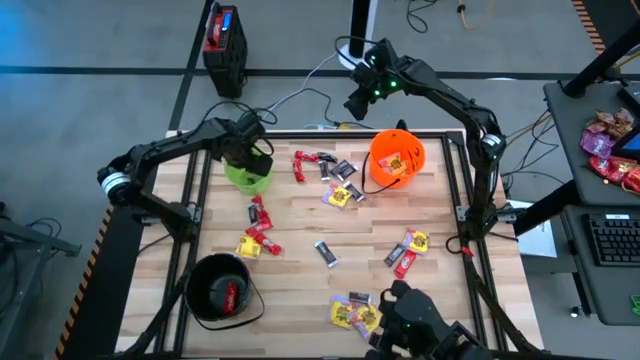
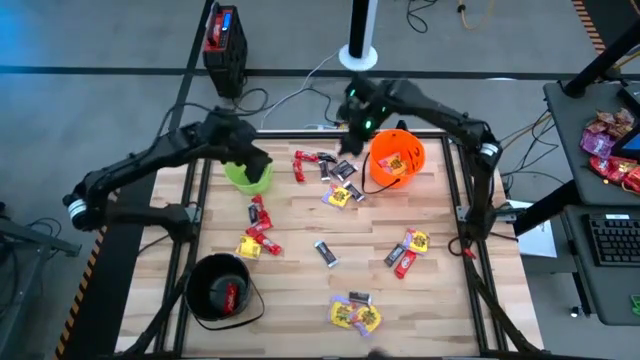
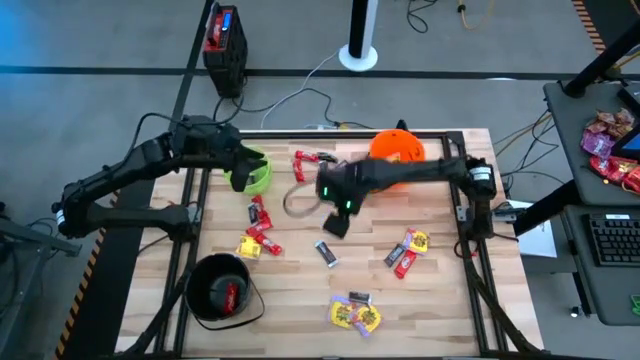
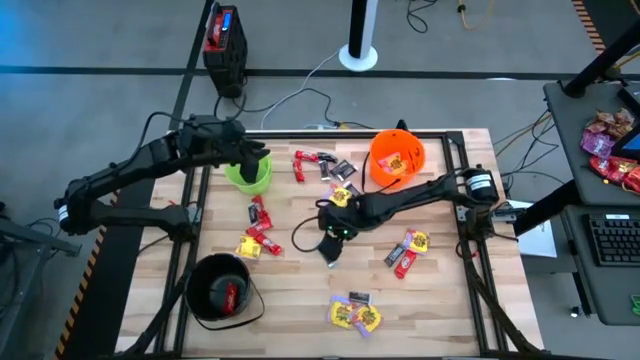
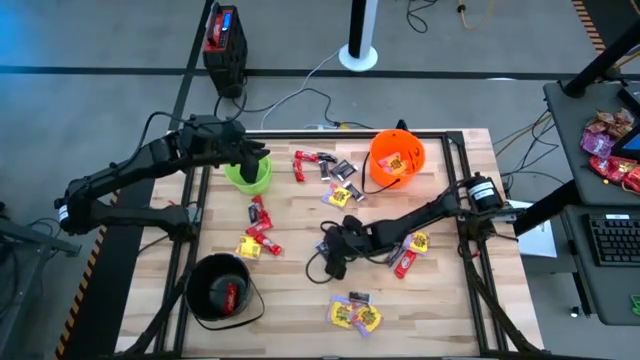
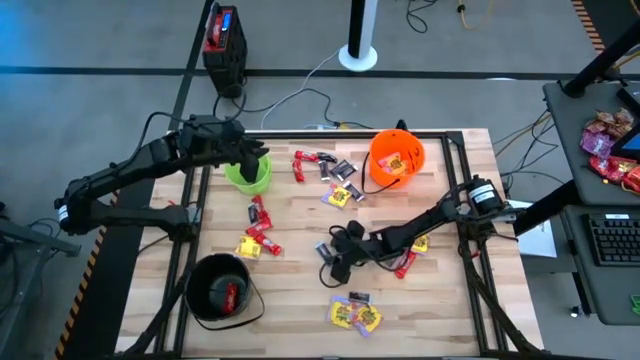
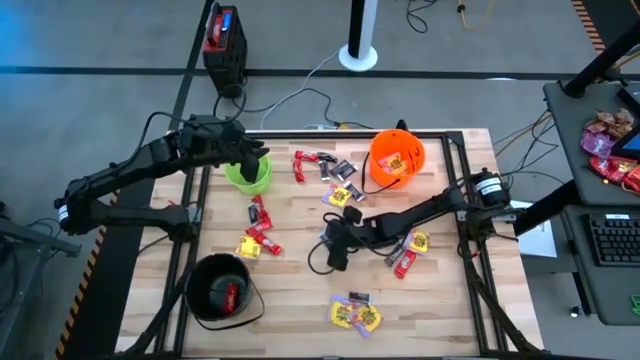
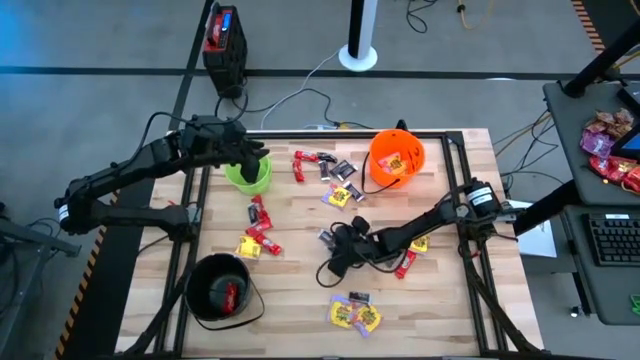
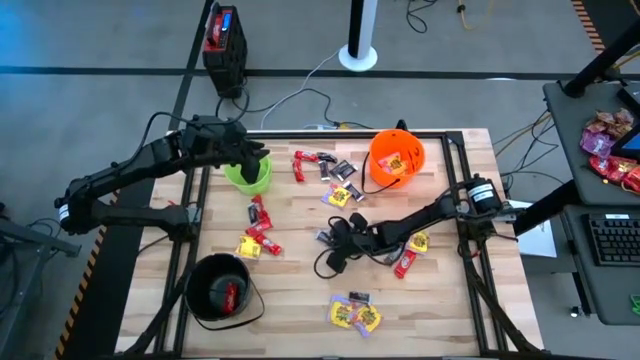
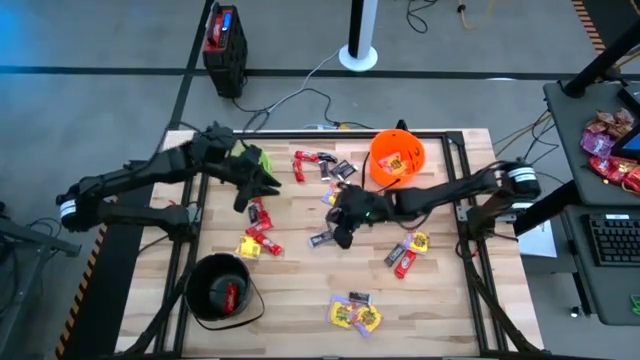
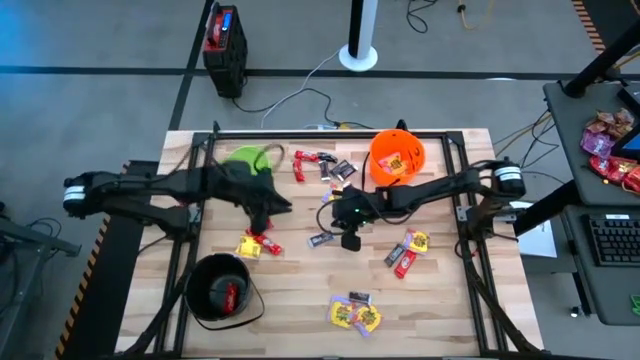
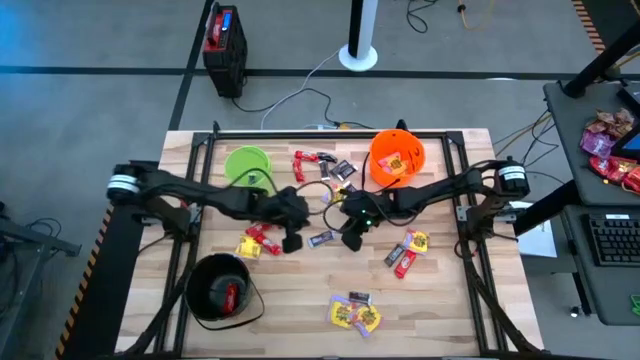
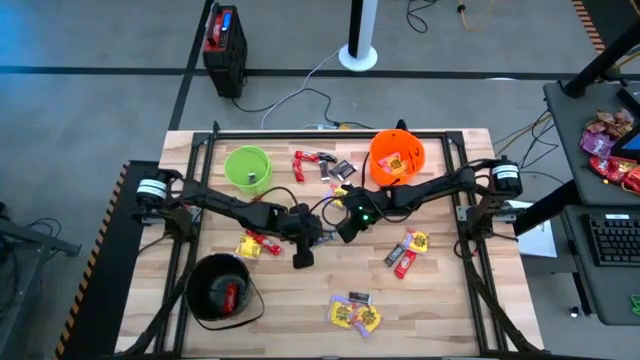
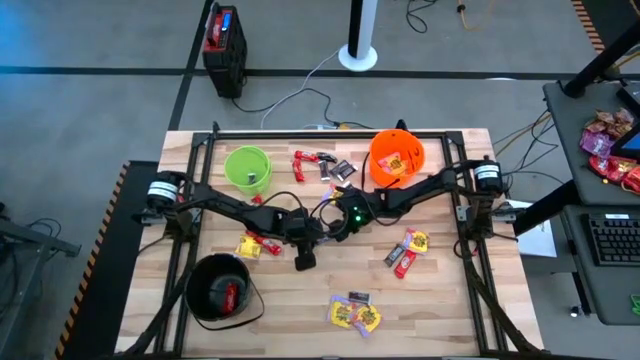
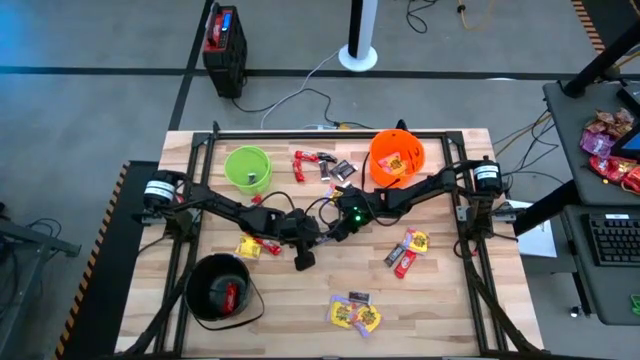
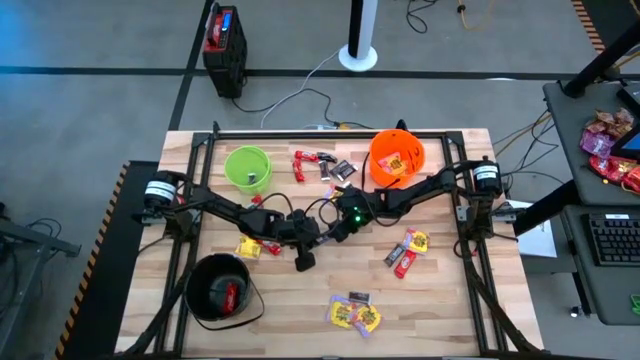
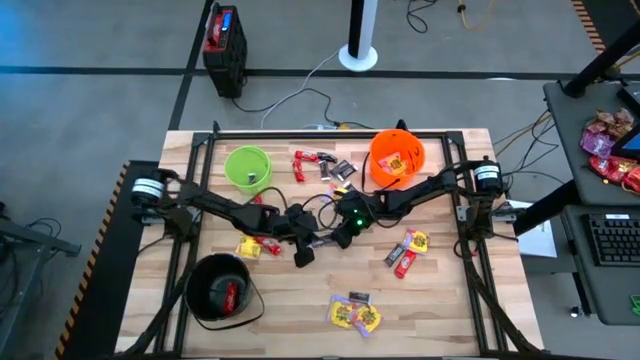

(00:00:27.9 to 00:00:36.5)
Task: Sort candy by brand, put in halloween buckets
Put the brown candy into the green bucket

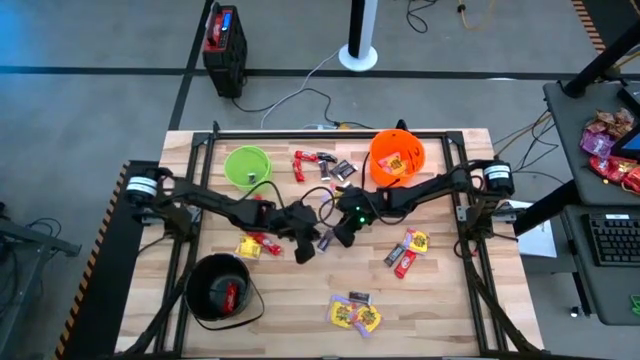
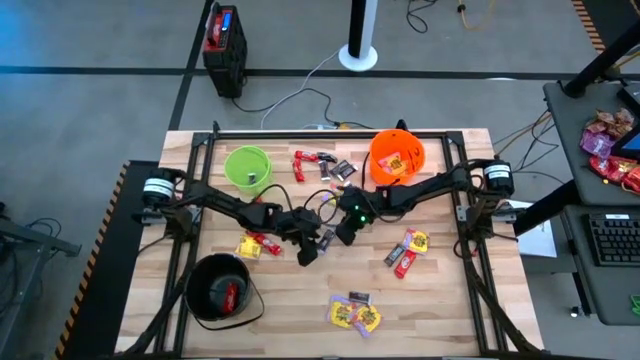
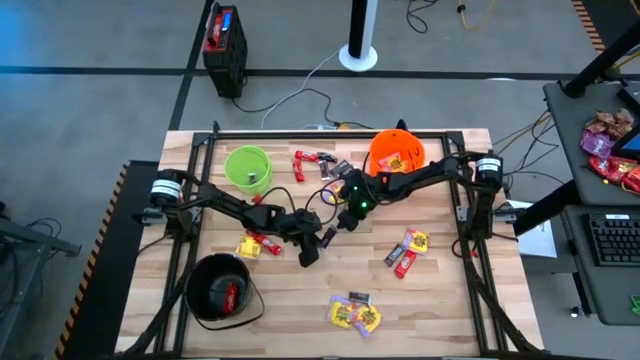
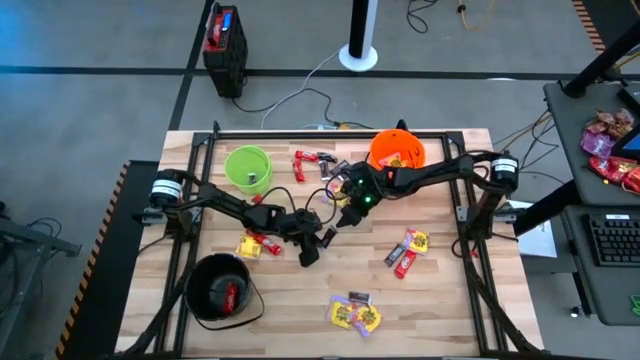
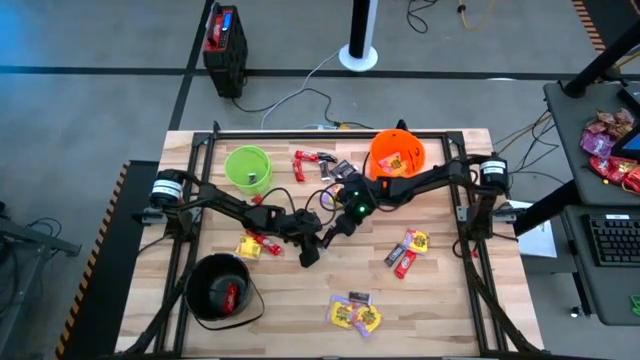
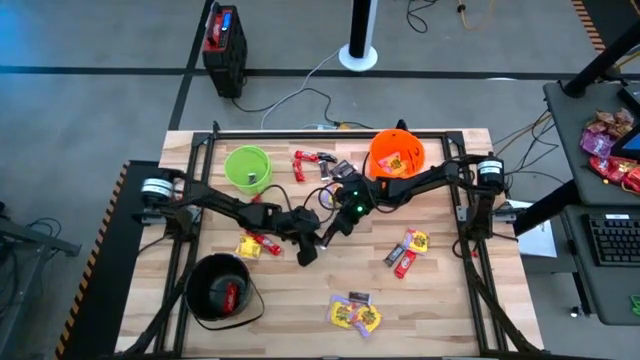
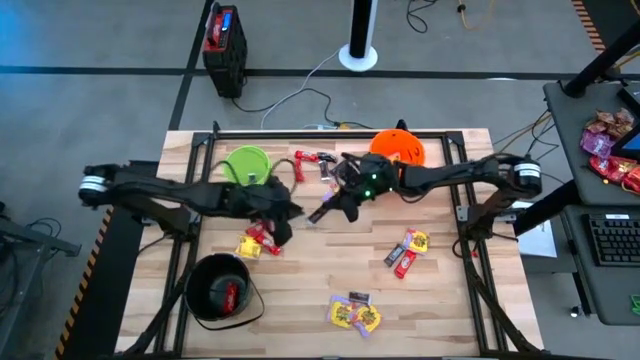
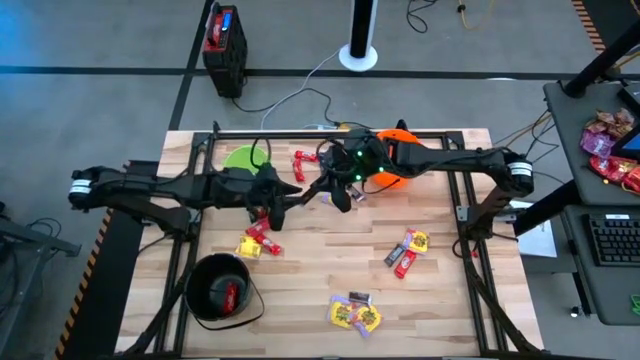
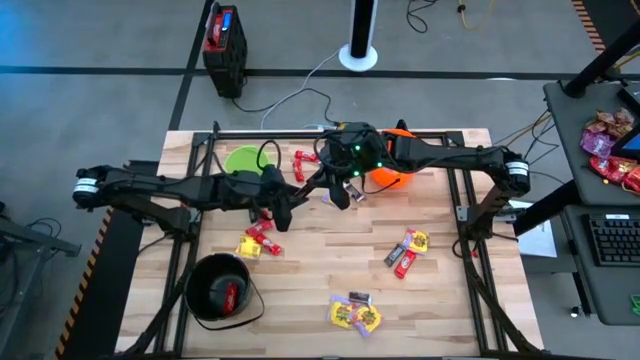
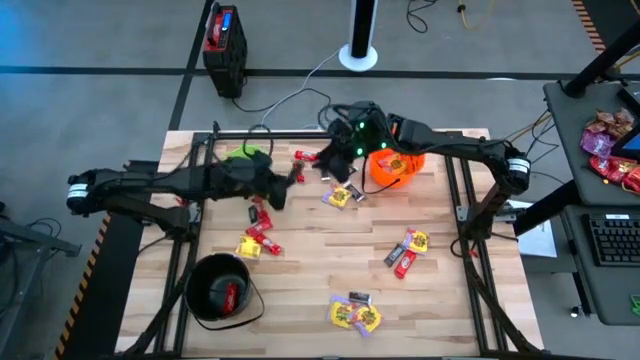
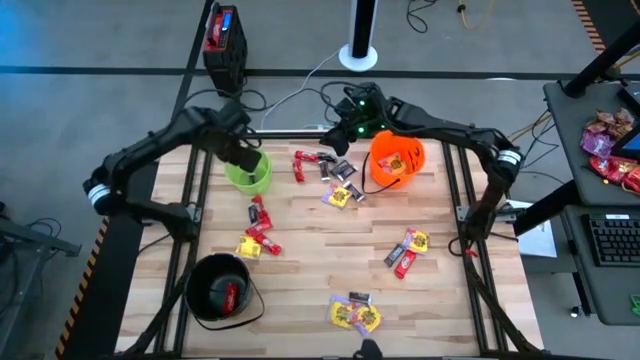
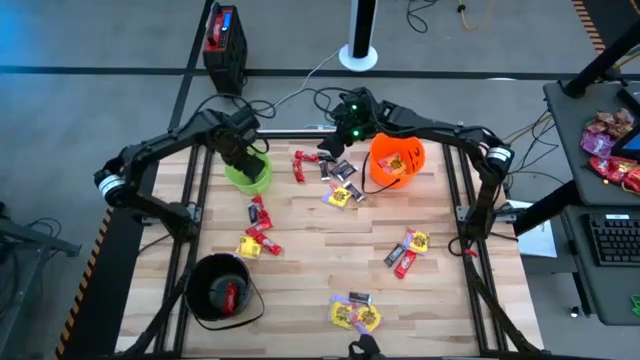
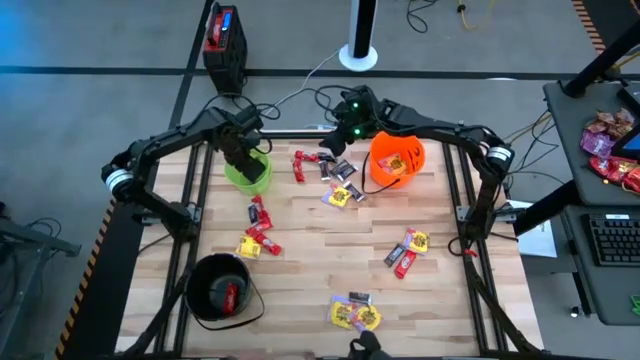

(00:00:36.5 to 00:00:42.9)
Put the brown candy into the green bucket

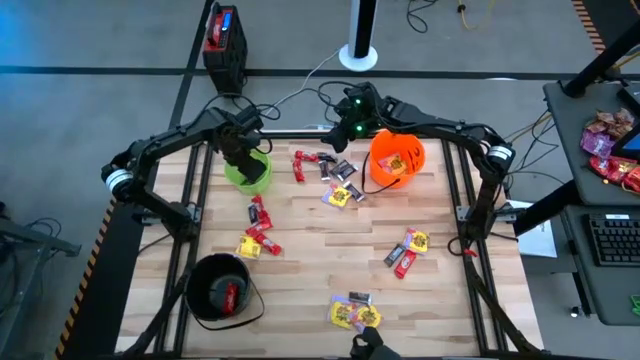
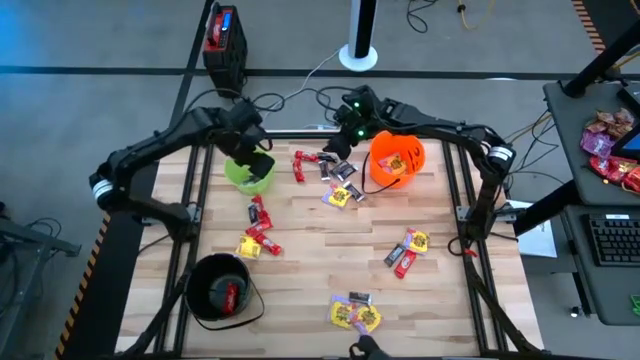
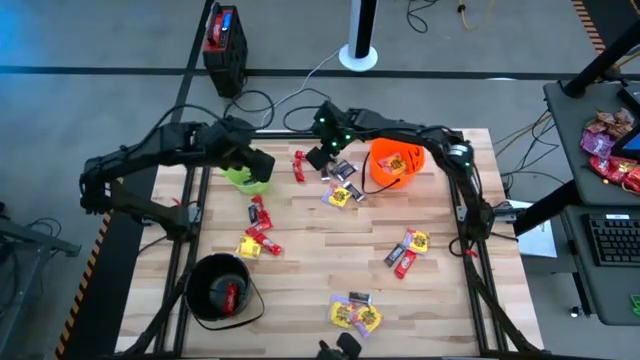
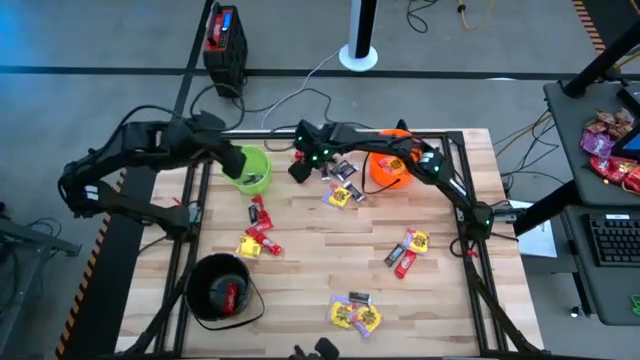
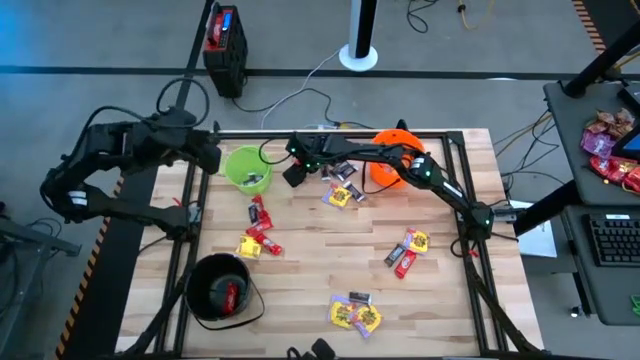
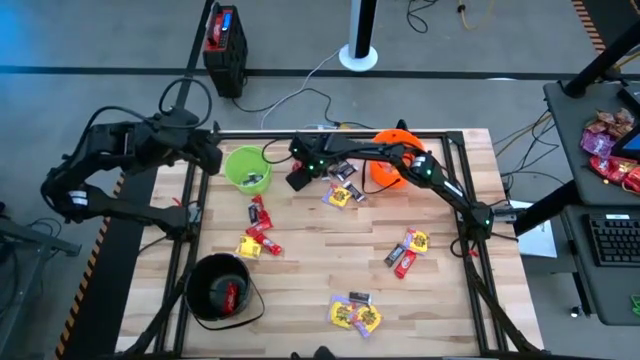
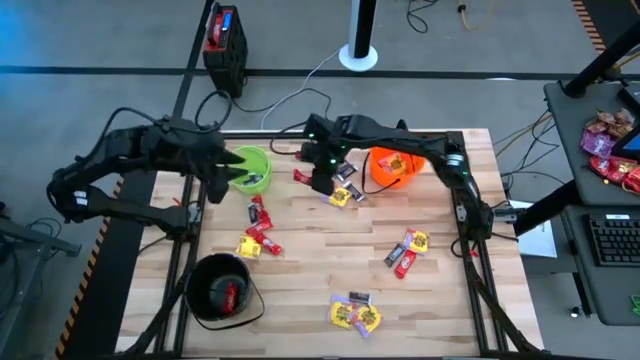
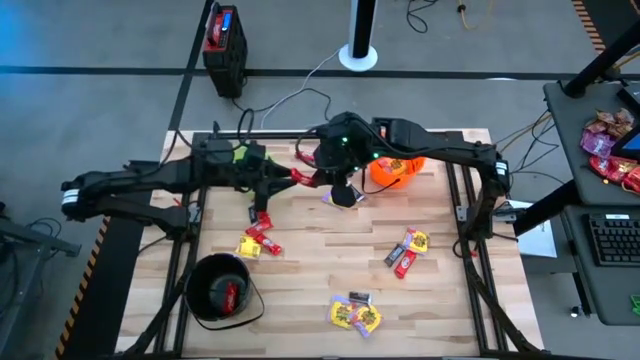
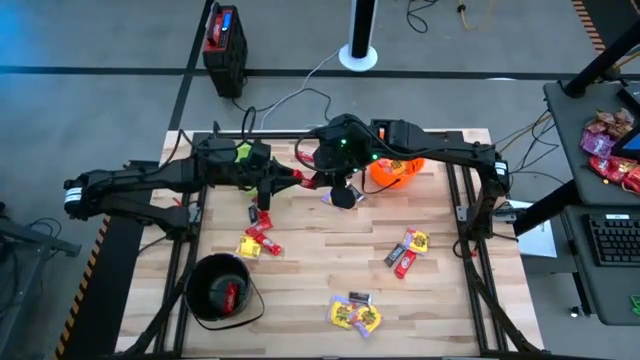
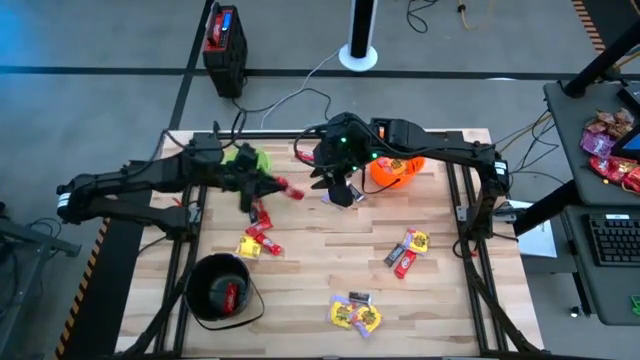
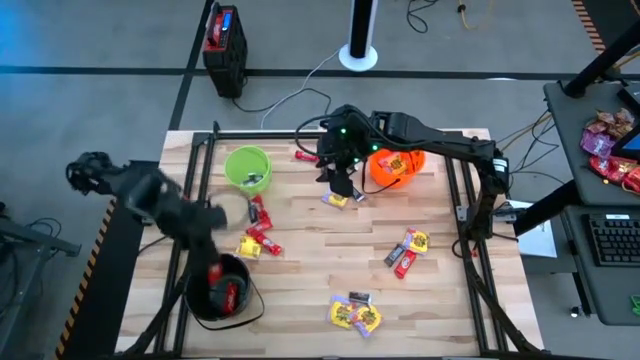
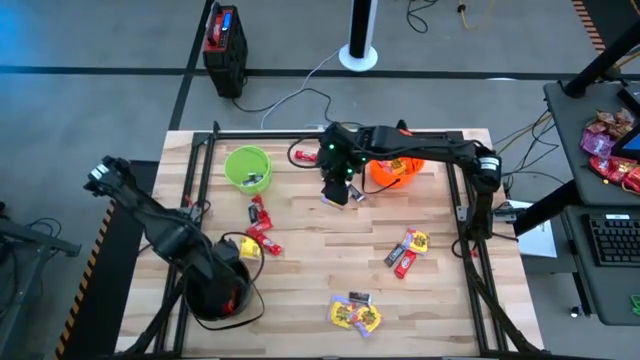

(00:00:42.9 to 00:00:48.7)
Put the red candy into the black bucket

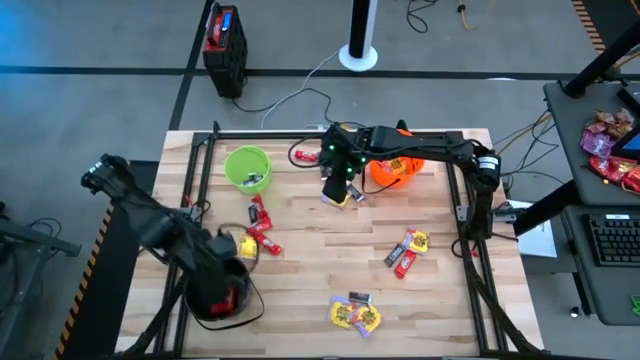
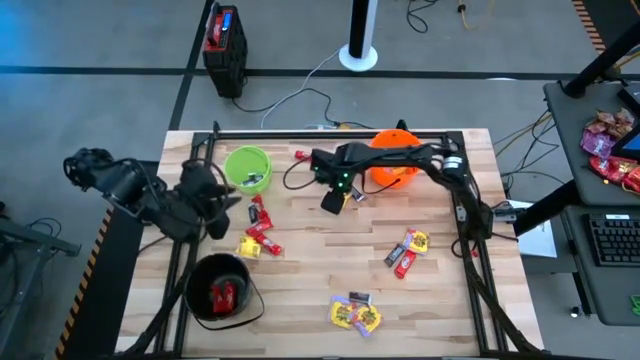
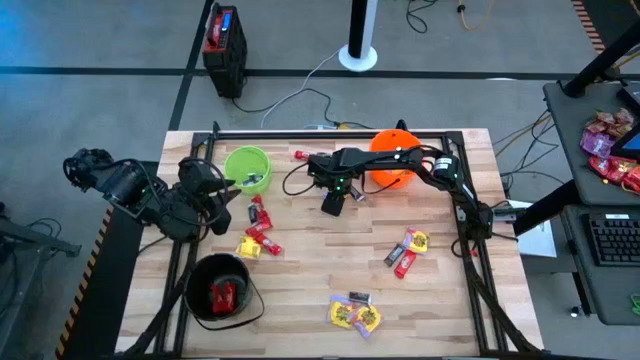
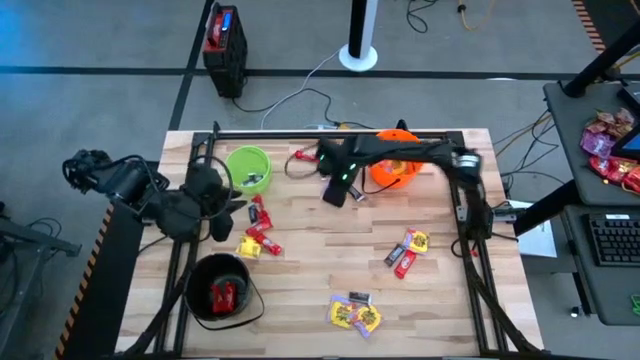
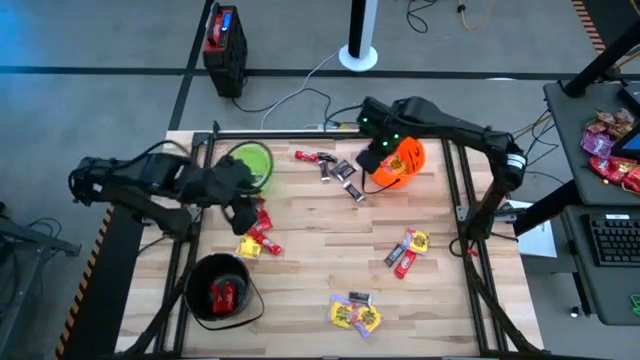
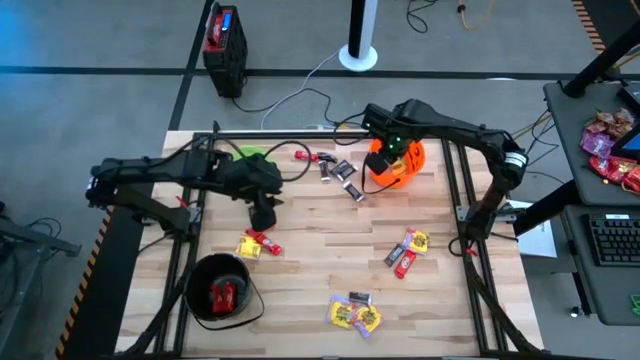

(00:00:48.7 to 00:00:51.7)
Put the yellow candy into the orange bucket
